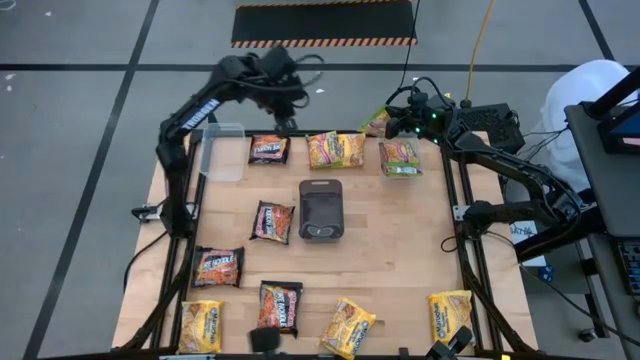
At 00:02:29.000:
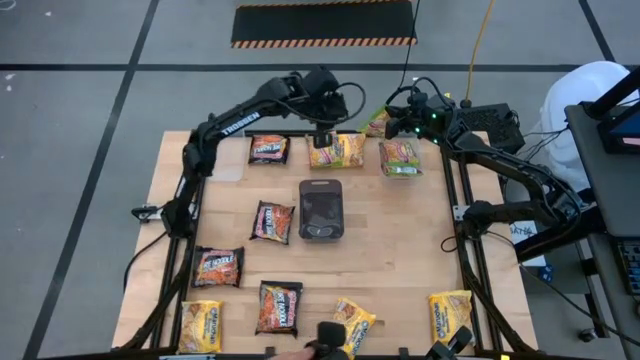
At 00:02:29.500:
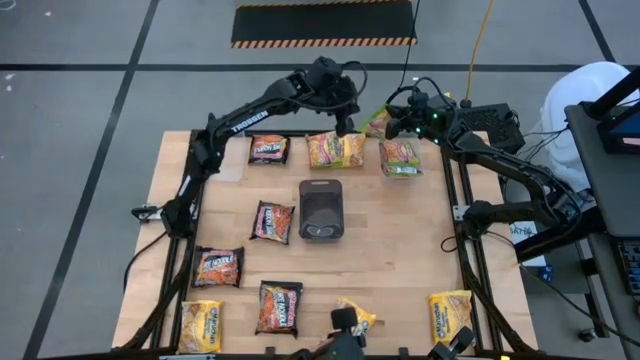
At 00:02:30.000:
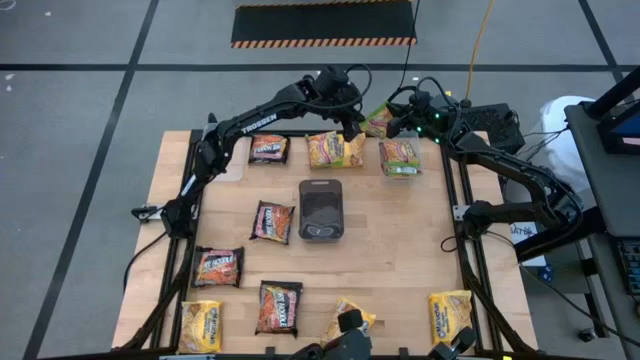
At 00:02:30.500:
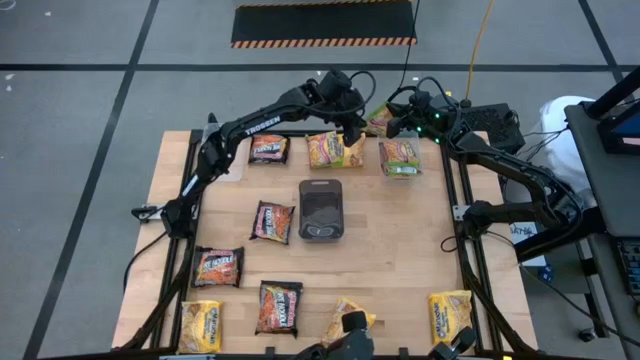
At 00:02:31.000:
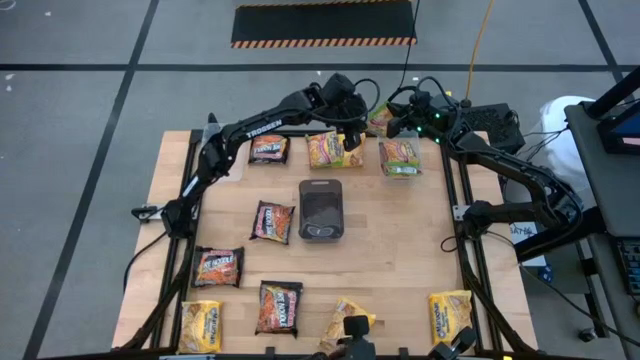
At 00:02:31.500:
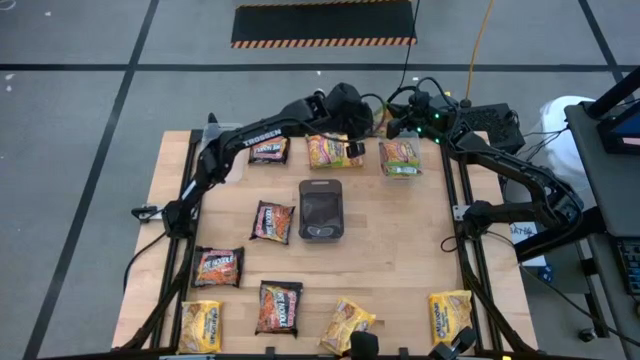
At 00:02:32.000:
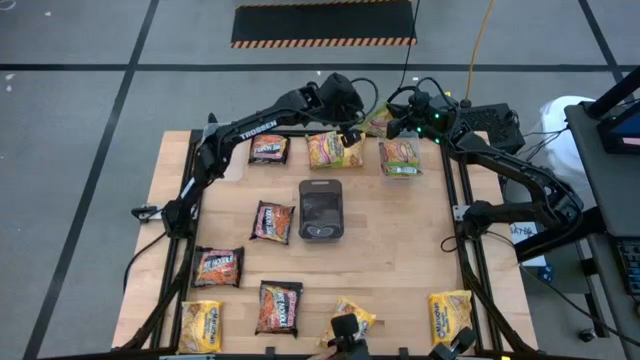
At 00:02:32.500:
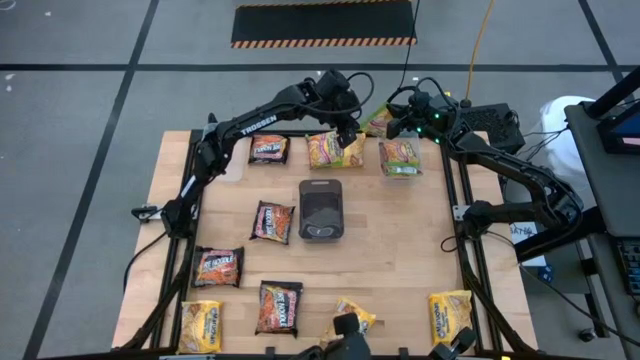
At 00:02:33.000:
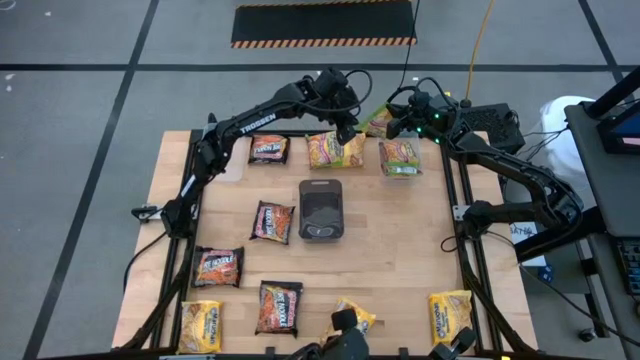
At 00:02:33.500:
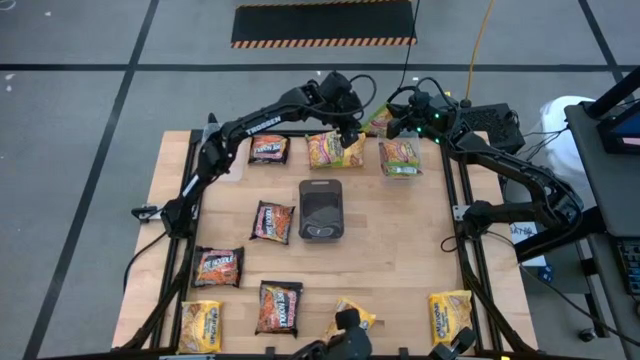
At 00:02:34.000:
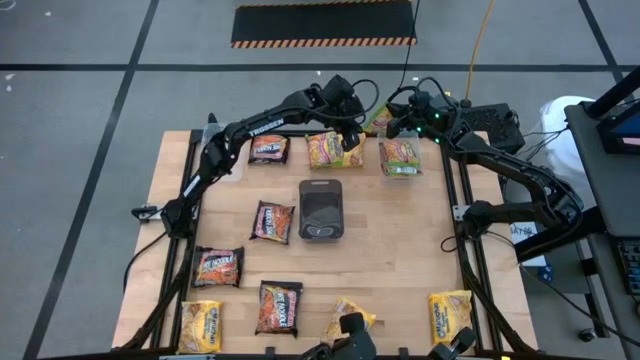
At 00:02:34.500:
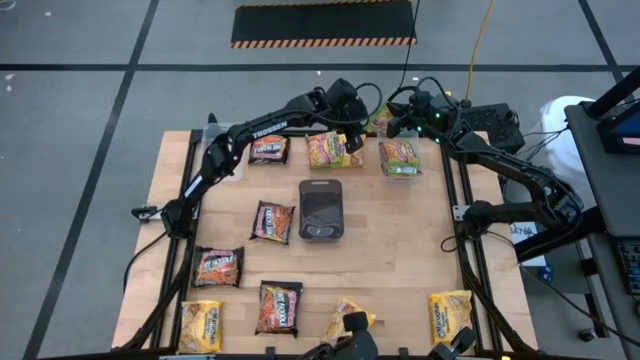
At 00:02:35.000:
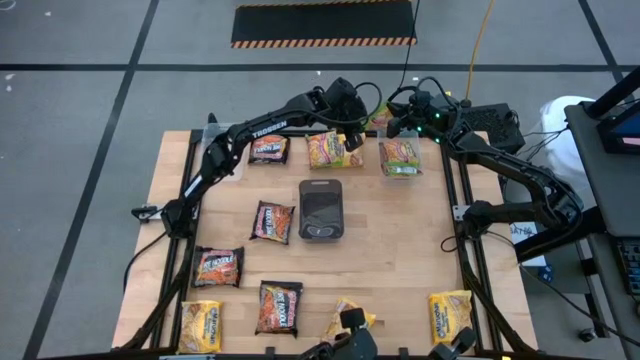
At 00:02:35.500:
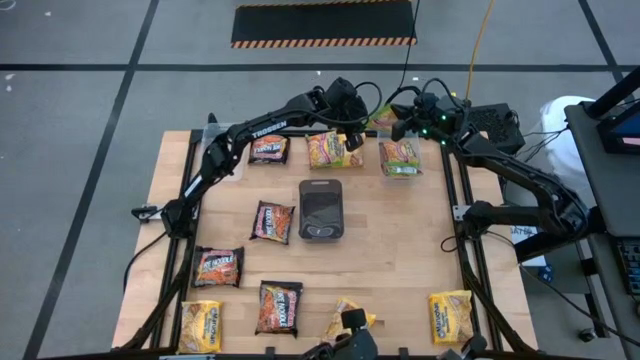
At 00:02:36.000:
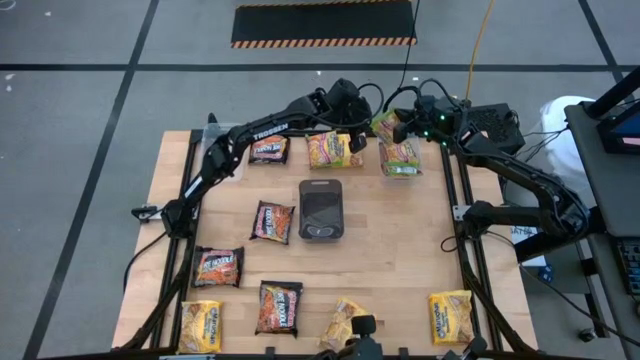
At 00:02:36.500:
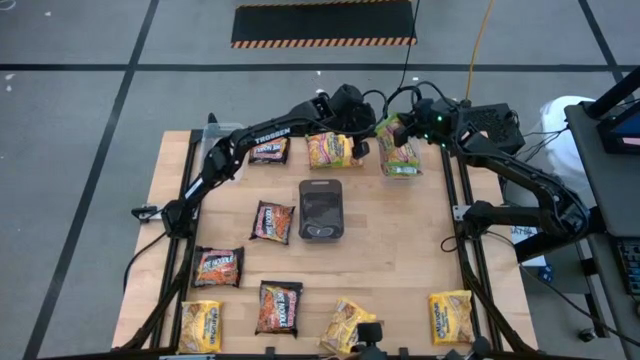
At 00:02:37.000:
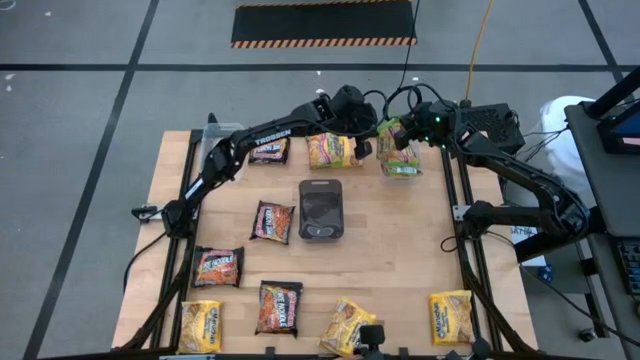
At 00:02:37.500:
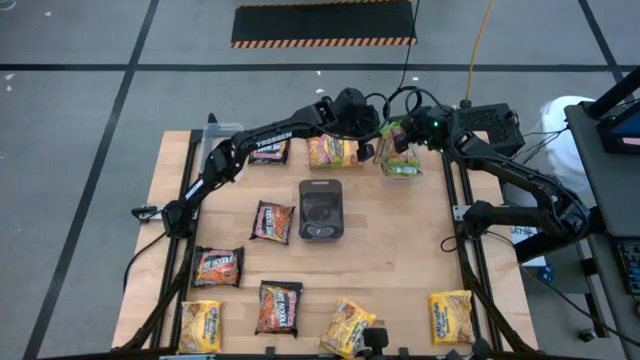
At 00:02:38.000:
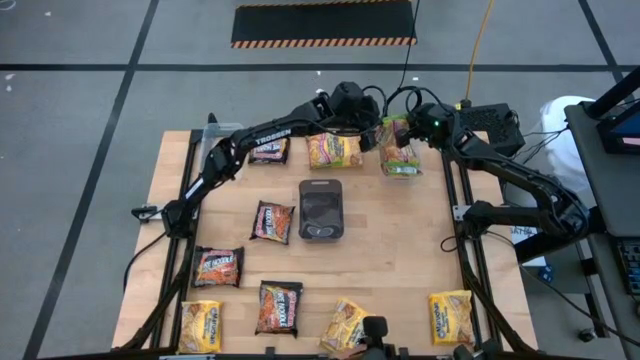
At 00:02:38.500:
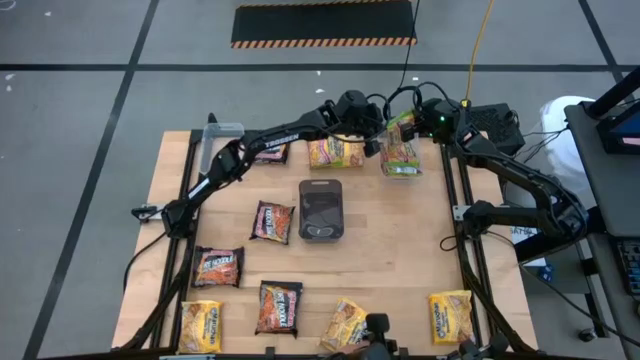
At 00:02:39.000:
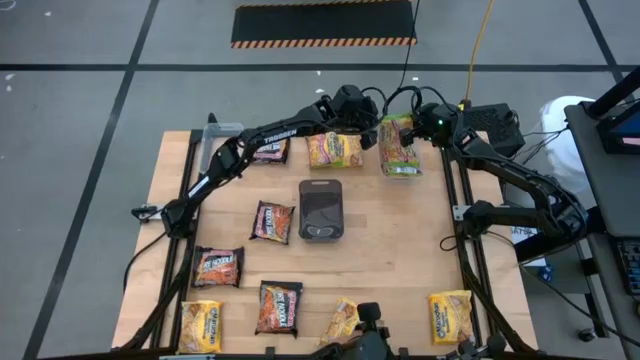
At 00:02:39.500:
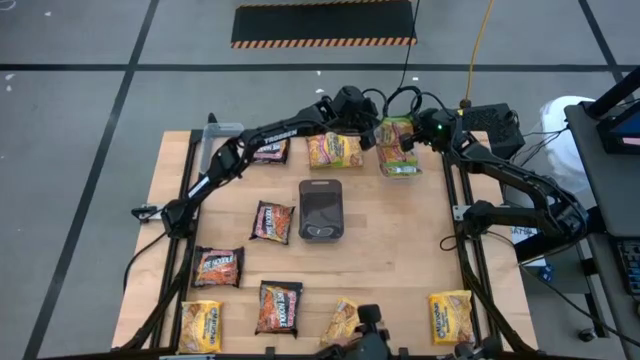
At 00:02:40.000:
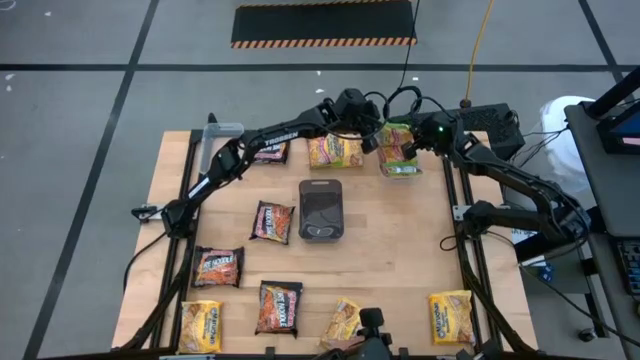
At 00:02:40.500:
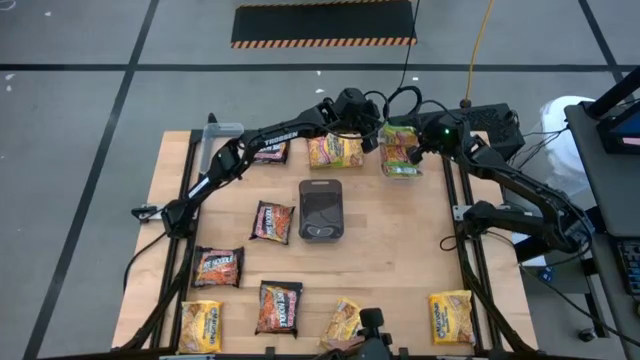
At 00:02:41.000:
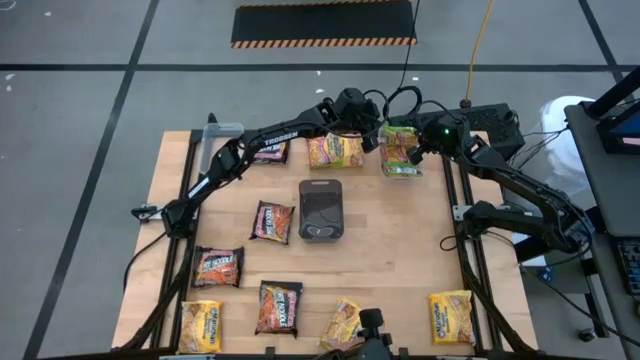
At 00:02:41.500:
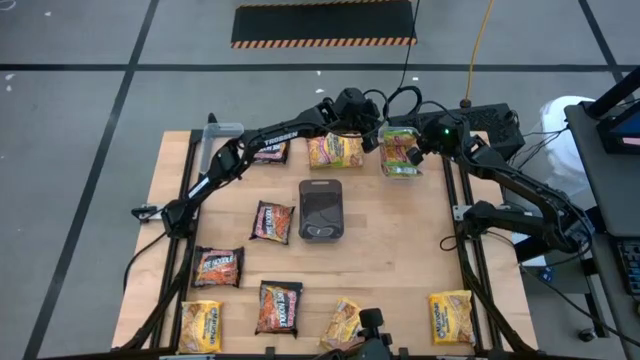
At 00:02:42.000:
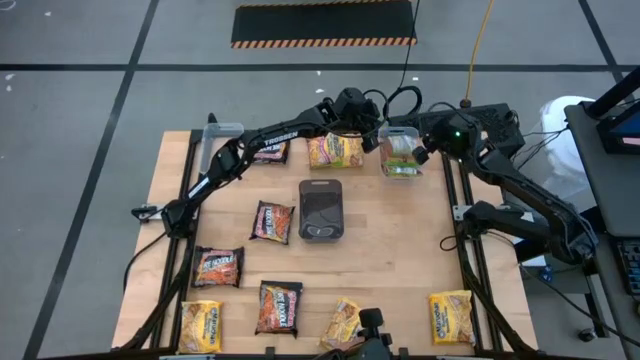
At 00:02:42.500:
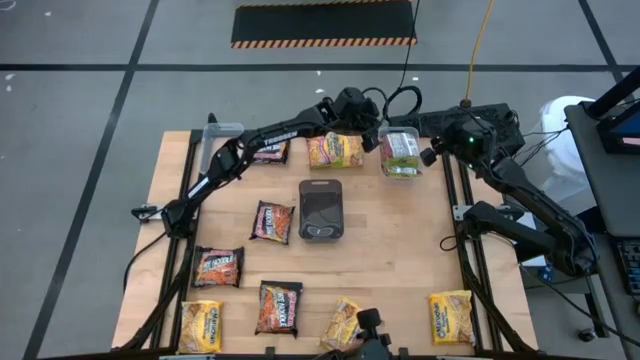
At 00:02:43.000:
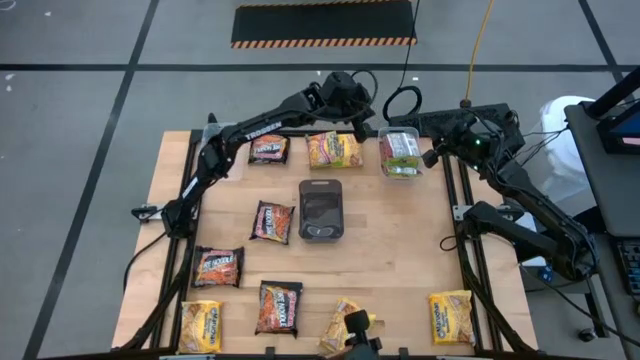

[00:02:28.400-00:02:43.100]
Task: Sort Maruchan noodles
Put the right green noodle pack into the right transparent bin

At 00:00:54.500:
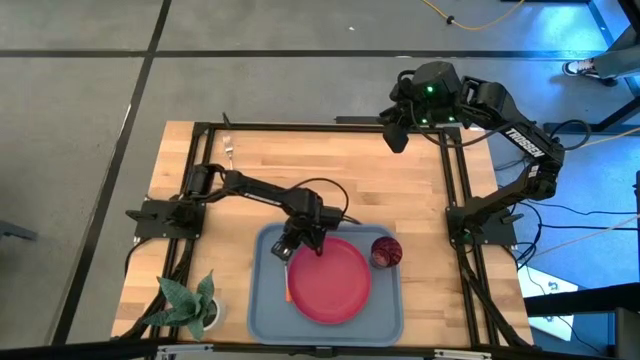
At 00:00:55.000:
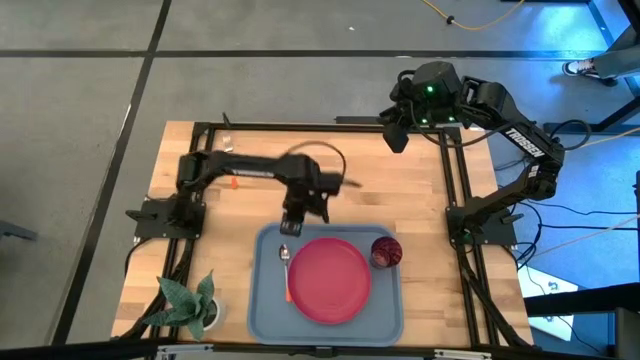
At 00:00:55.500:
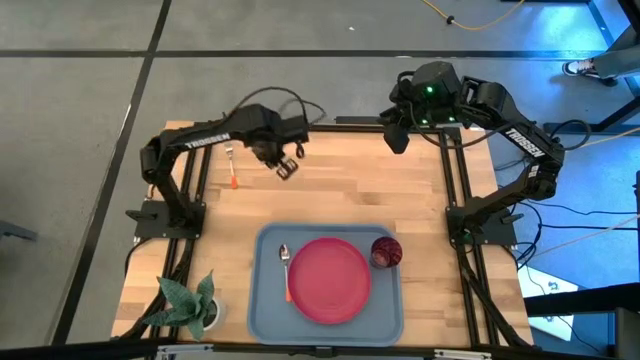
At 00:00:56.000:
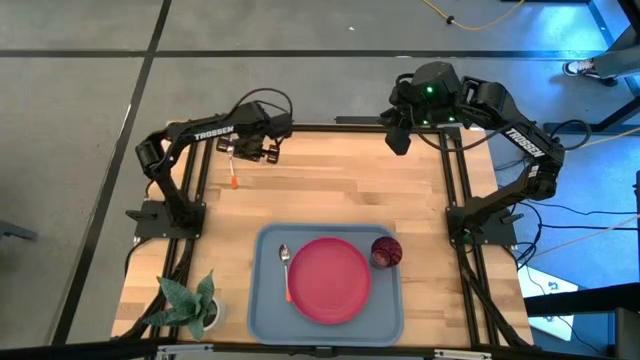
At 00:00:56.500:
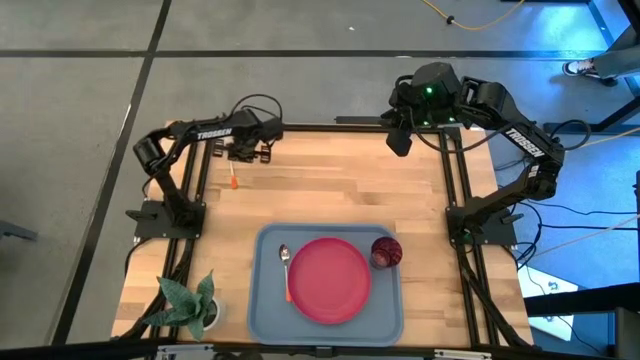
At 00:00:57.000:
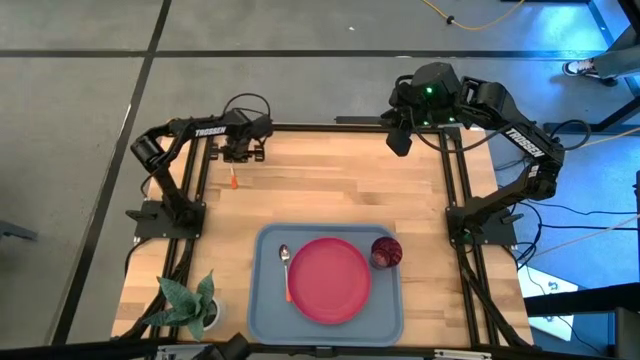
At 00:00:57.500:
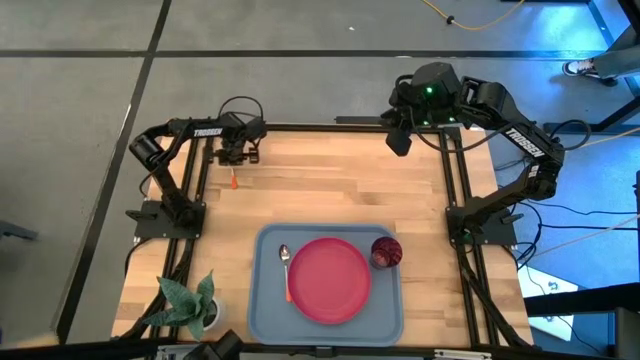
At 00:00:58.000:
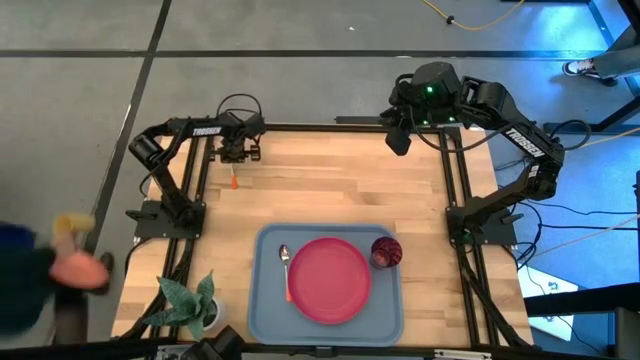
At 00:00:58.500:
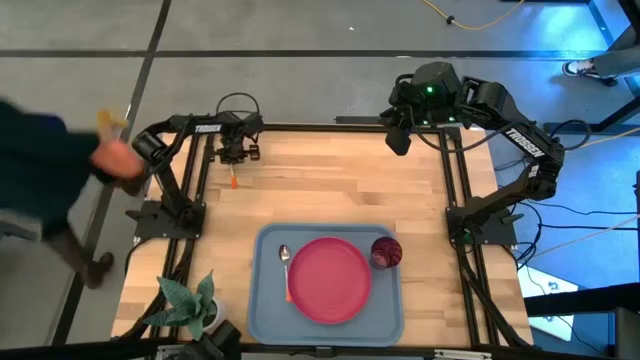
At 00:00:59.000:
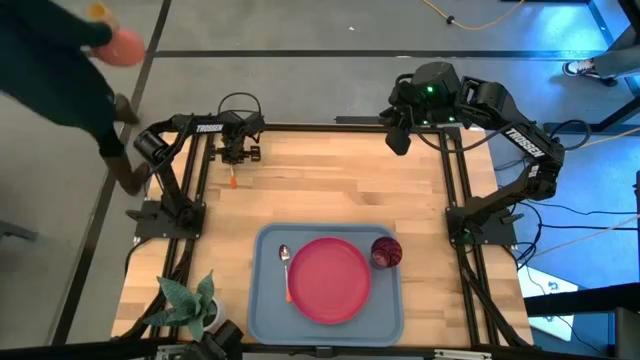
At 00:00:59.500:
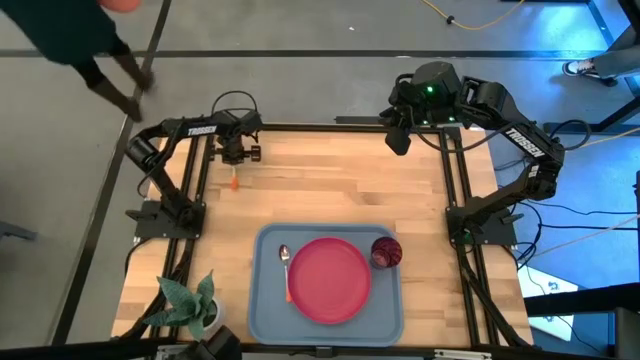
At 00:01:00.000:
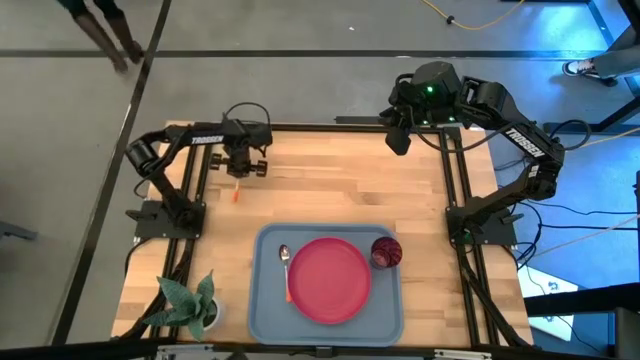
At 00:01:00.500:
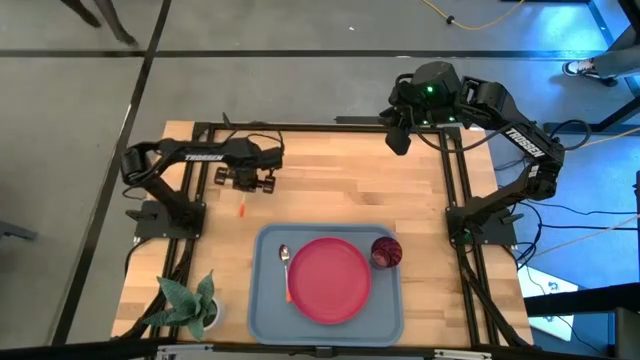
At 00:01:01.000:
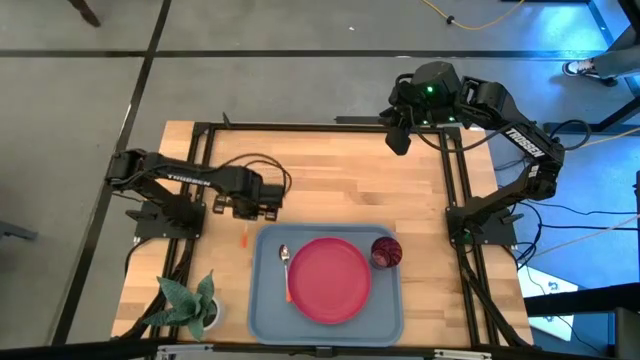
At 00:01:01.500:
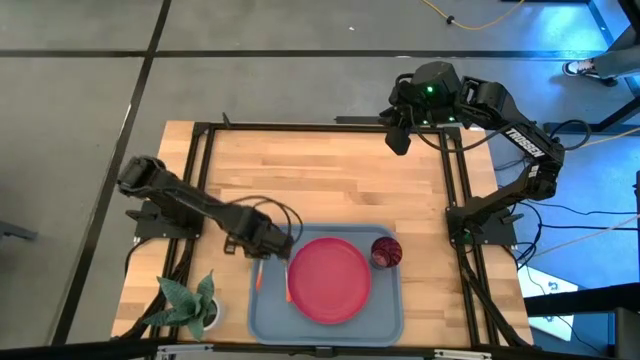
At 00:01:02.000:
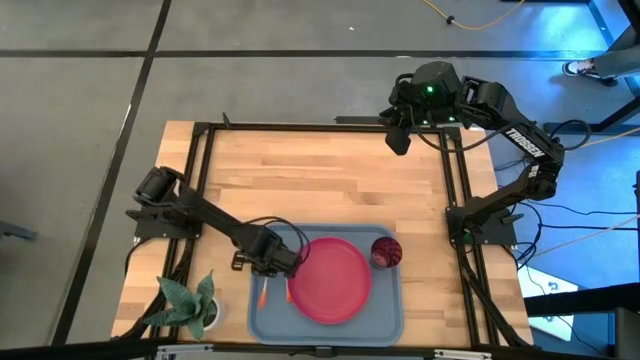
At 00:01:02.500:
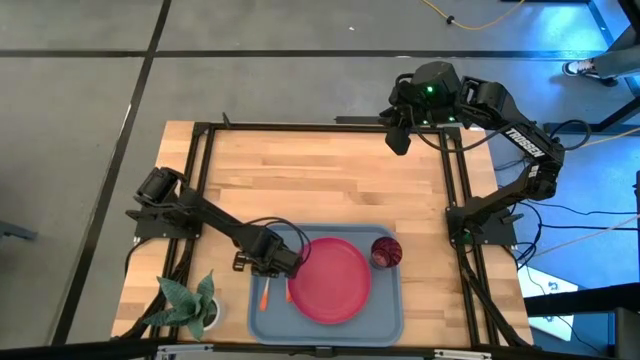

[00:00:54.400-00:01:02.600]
Task: Pick and place plate/cup/fork/spoon on tray
Put the orange fork on the blue serving tray to the left of the orange spoon
